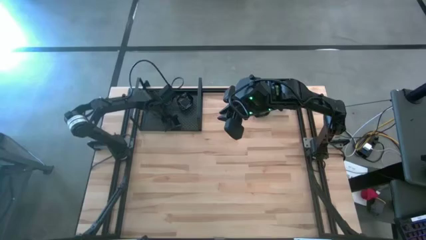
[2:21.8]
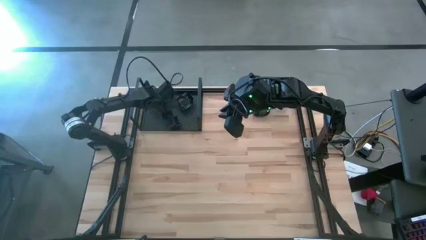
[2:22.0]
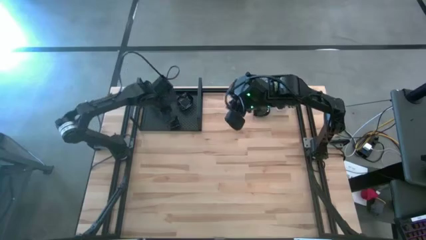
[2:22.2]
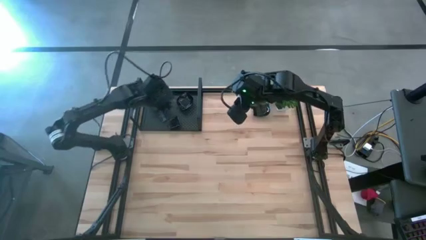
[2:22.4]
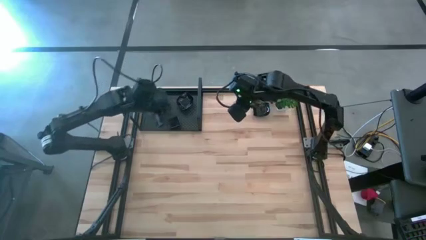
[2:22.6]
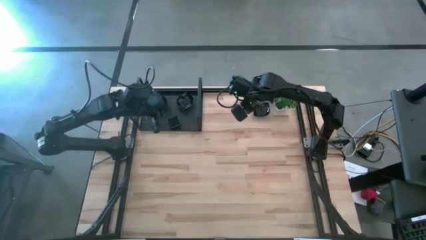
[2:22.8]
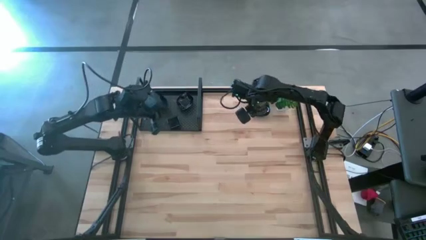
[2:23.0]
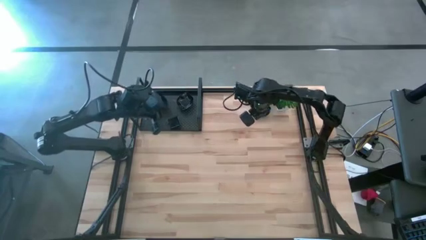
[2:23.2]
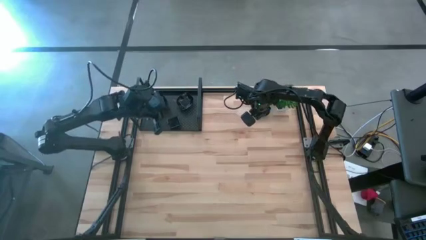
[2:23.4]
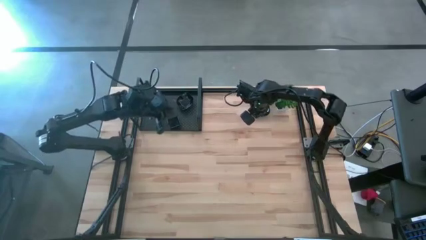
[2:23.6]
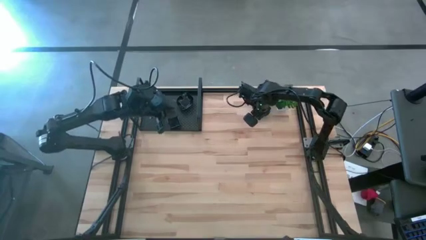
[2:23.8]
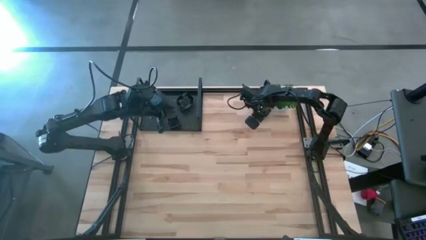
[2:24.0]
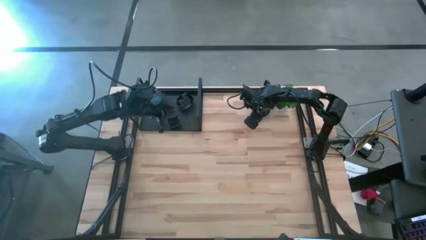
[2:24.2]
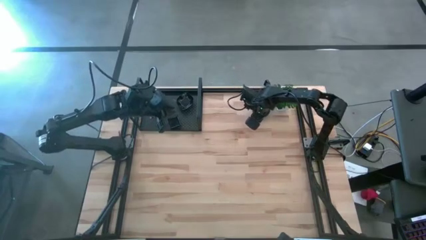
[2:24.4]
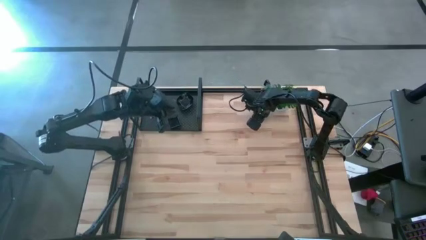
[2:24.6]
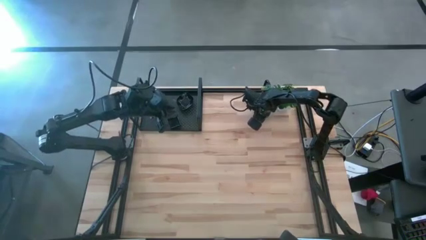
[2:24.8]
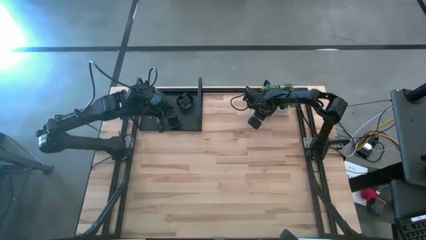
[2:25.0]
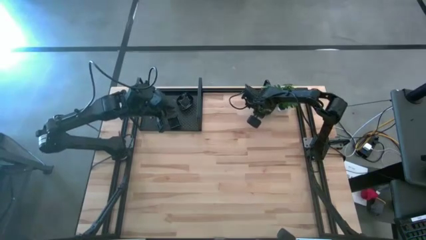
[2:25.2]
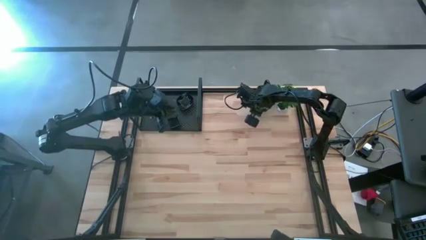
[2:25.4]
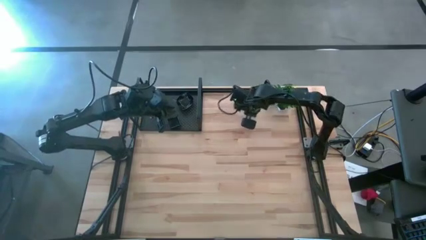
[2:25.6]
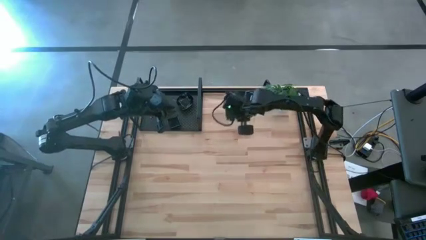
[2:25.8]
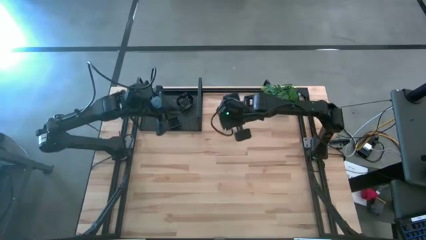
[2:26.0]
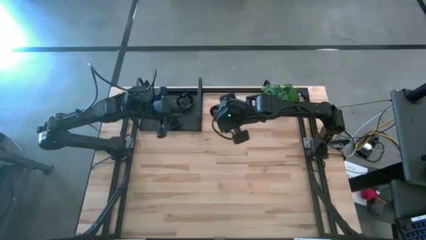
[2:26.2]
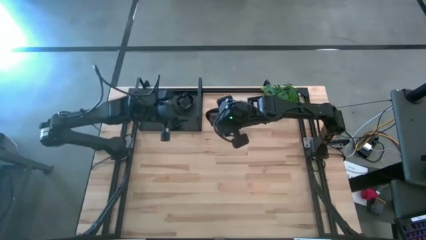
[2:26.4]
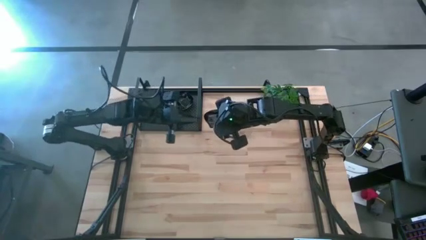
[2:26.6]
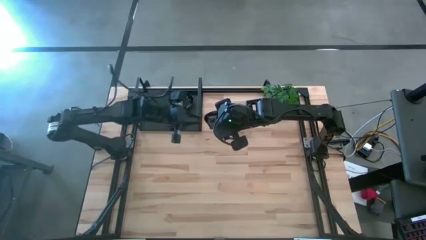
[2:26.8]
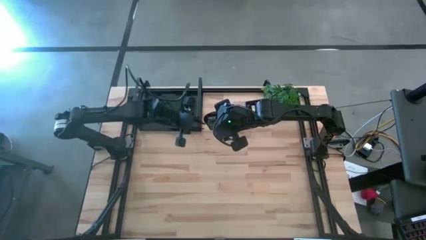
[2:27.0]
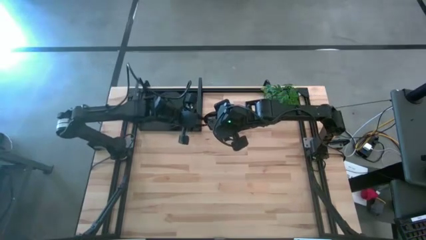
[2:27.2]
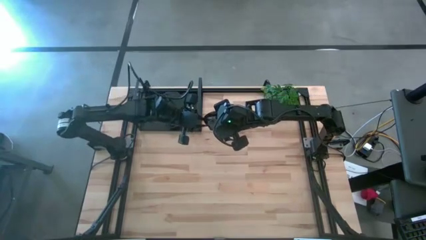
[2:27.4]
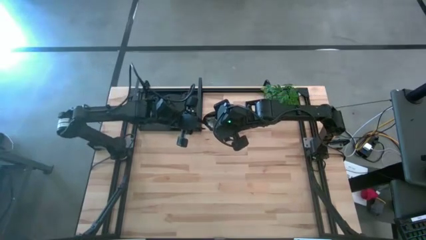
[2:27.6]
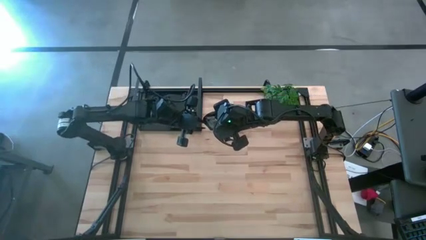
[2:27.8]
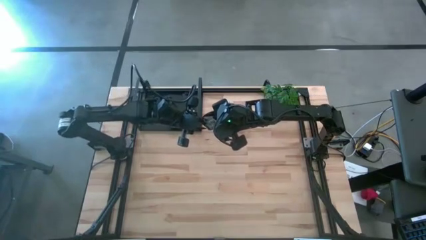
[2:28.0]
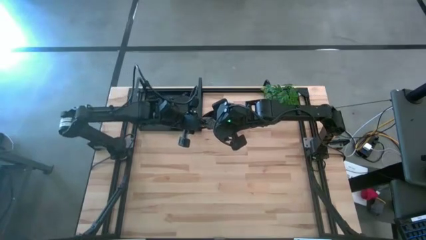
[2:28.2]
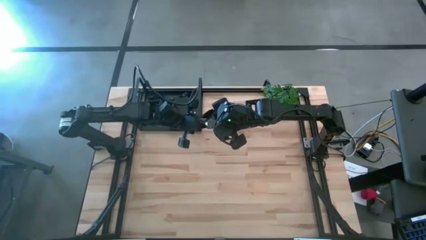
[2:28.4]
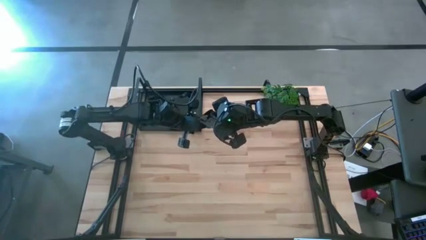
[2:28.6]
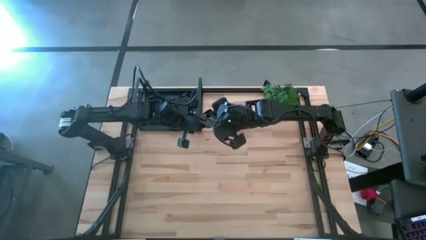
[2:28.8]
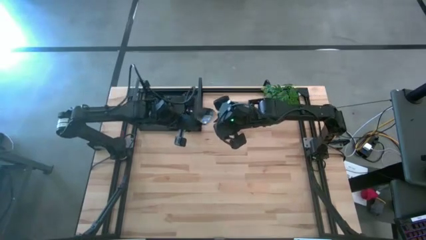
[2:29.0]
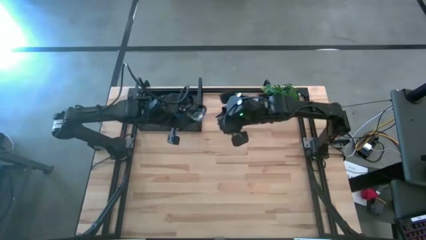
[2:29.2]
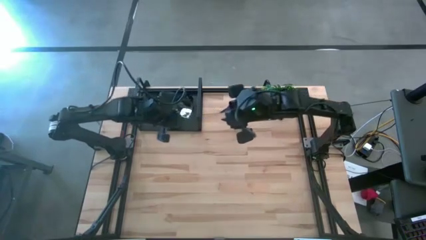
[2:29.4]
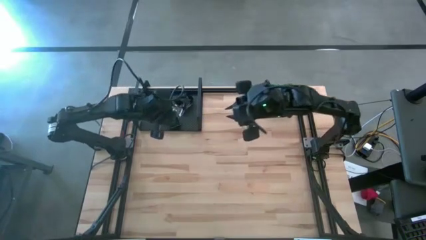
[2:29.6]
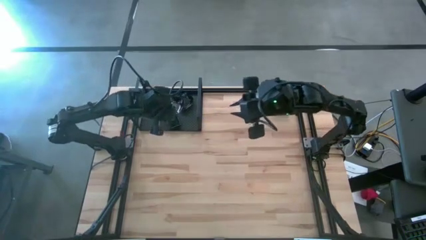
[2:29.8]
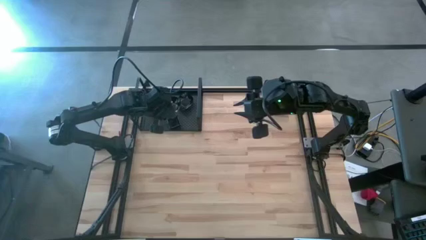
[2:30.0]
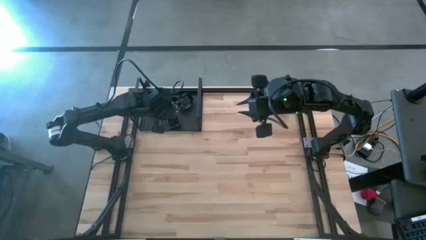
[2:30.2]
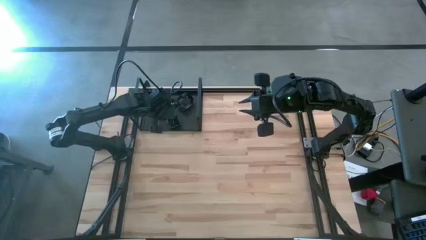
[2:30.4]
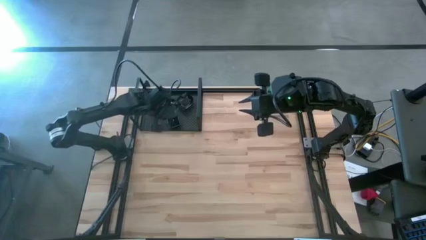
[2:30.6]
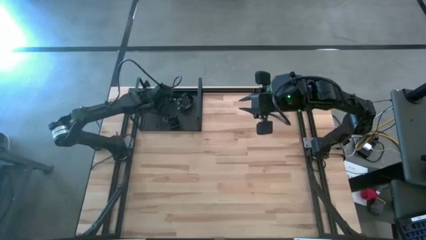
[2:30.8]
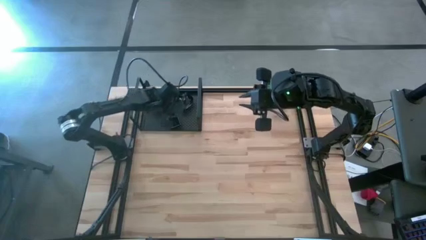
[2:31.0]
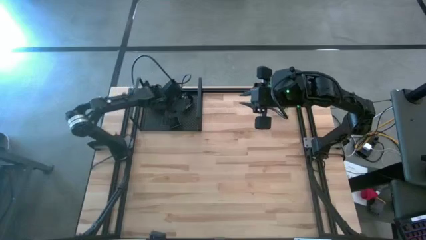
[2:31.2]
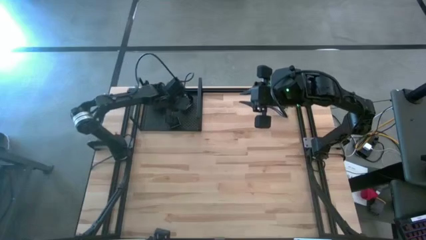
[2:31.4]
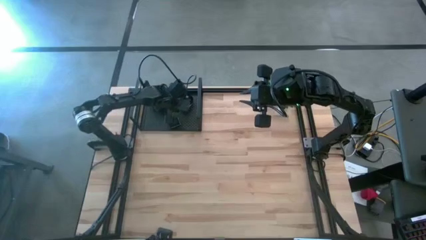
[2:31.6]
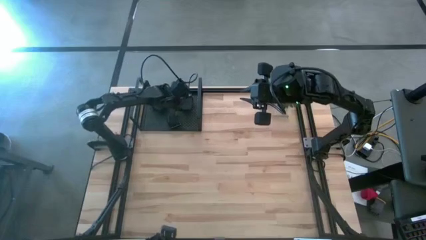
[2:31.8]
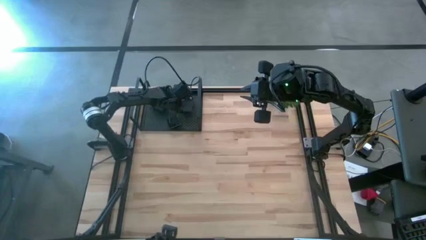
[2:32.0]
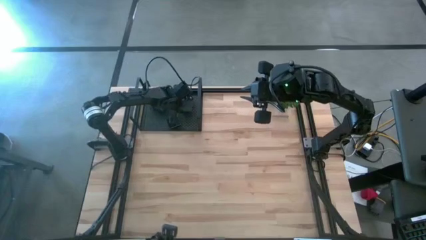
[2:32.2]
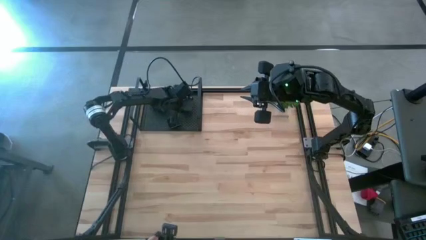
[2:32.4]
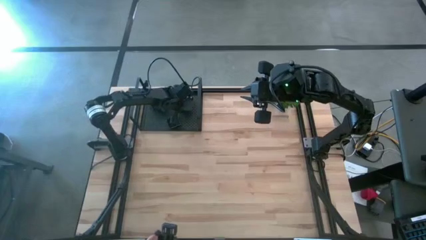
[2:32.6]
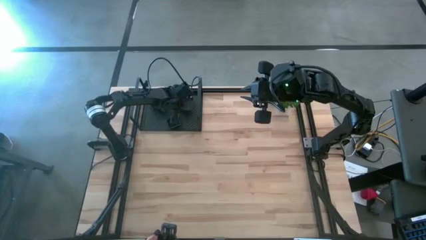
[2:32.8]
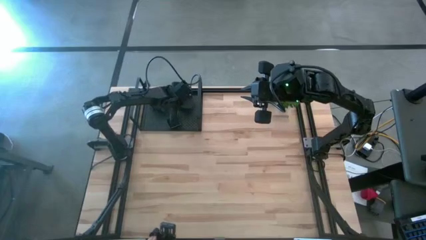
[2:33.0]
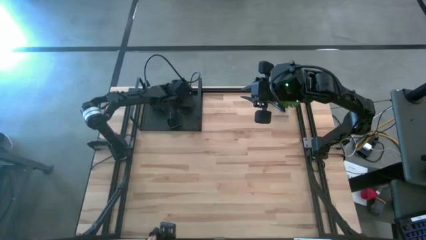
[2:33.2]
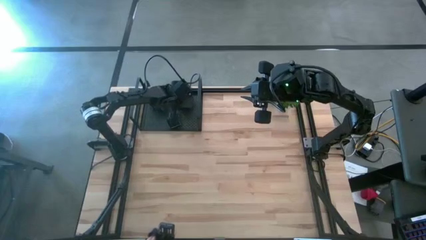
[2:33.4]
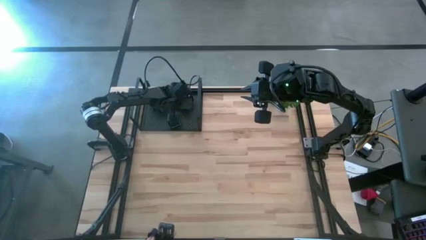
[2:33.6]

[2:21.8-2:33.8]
Task: Pick & Place Mini shaped plates
Stack the black leaf shaped plate on top of the black leaf shaped plates on the shelf

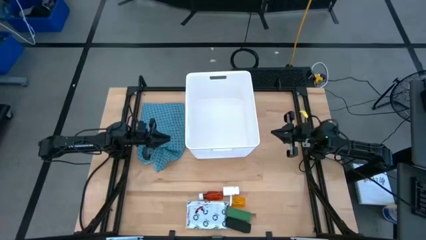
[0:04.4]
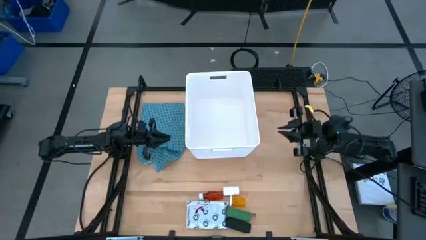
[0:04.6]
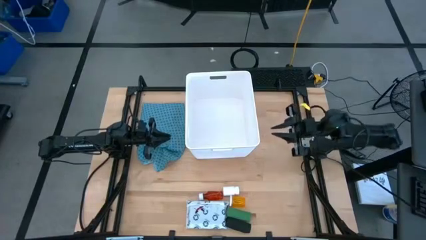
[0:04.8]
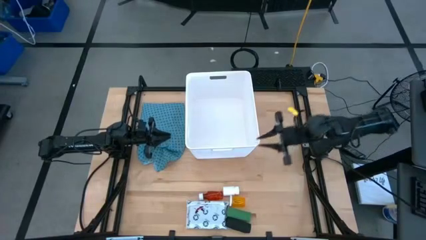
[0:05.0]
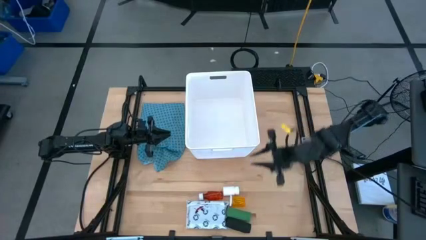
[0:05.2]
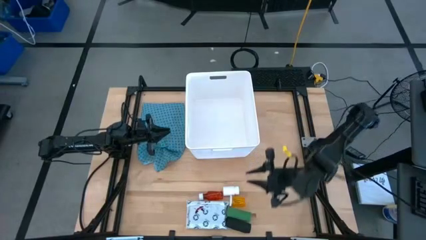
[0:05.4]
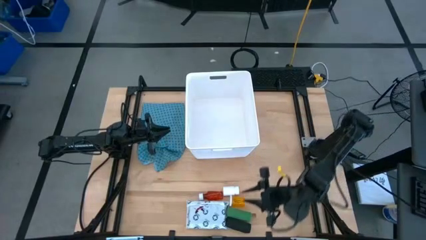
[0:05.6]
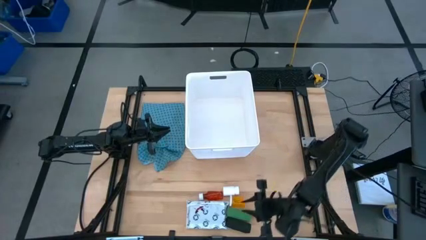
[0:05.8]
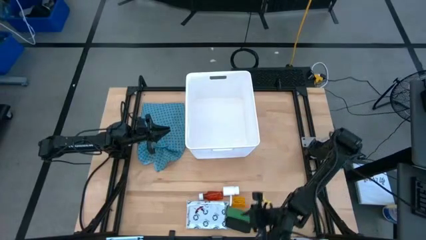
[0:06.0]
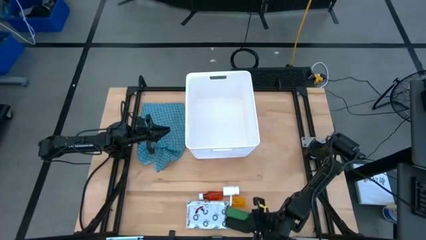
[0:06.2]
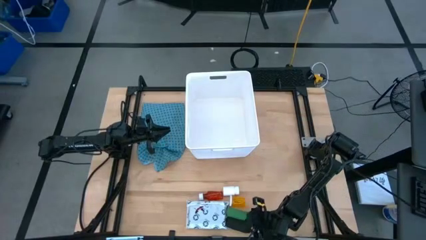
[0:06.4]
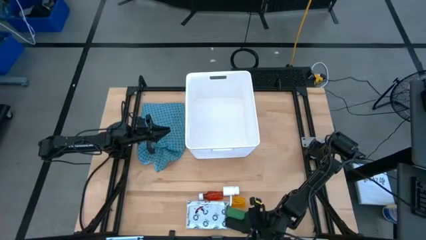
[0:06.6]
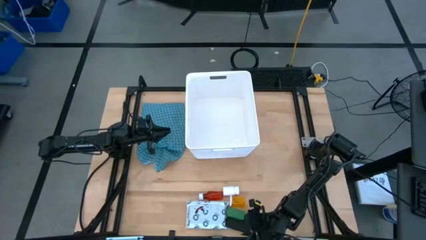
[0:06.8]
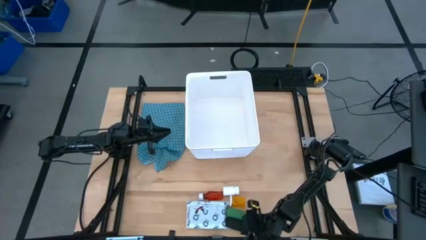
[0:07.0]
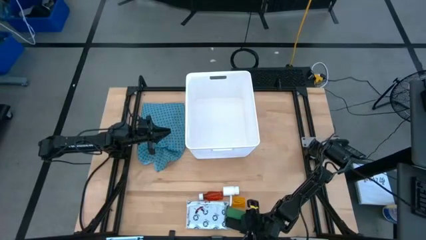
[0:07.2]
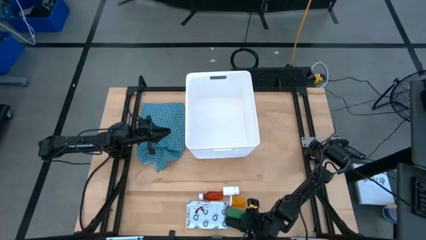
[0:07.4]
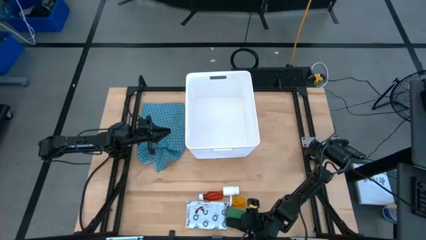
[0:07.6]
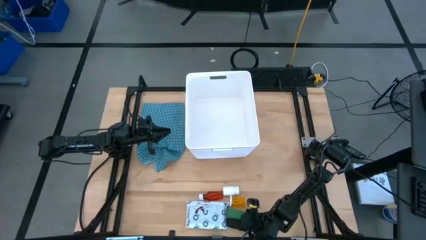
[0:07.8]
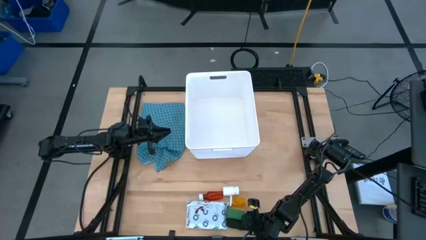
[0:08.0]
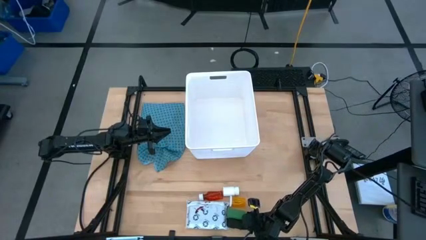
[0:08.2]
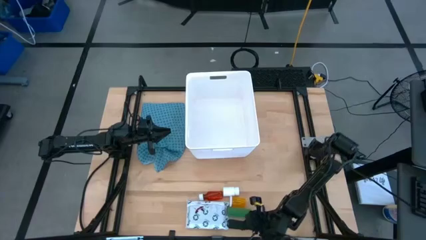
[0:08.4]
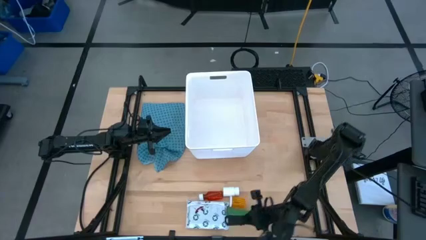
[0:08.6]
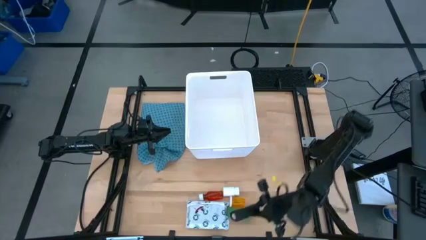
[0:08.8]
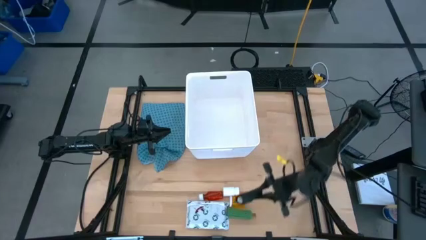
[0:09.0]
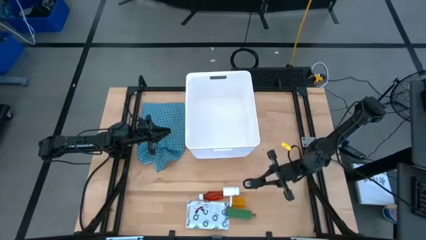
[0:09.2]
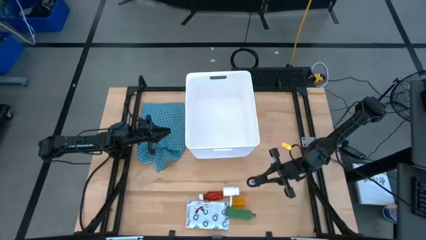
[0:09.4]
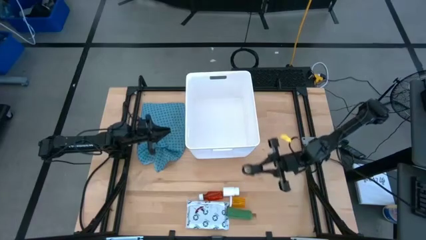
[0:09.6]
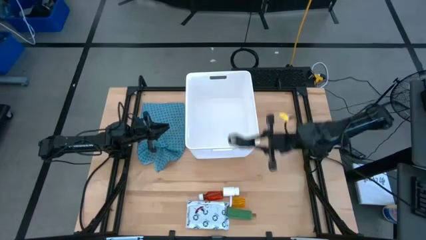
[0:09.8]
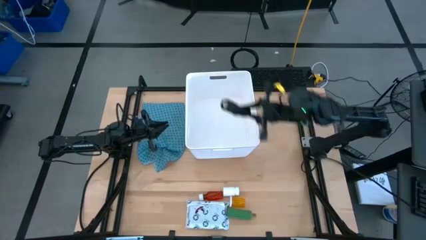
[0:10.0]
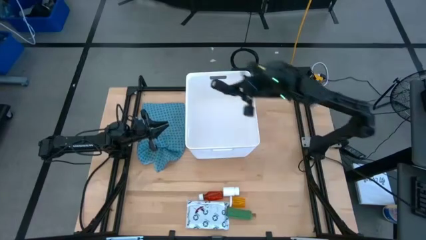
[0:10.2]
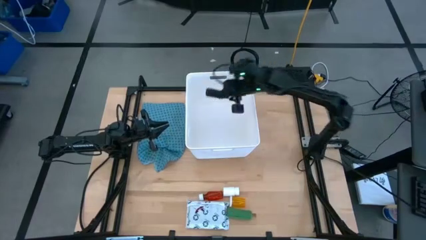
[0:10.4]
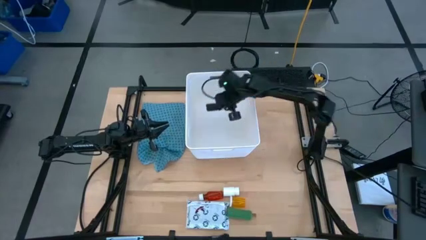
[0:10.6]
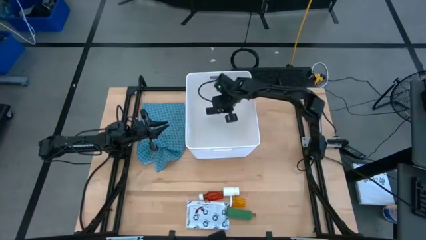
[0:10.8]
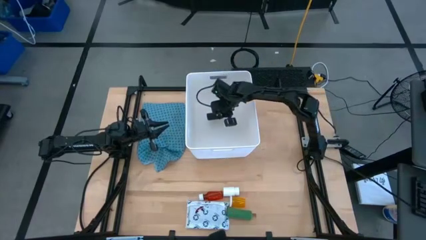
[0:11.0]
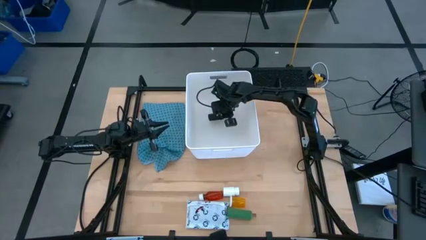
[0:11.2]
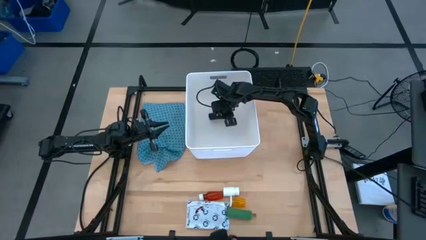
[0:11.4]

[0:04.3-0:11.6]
Task: Pick & place medical supplies in basket/bin
Put the black bandage into the white bin
